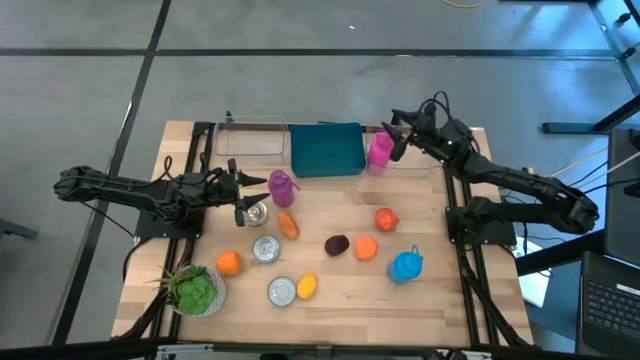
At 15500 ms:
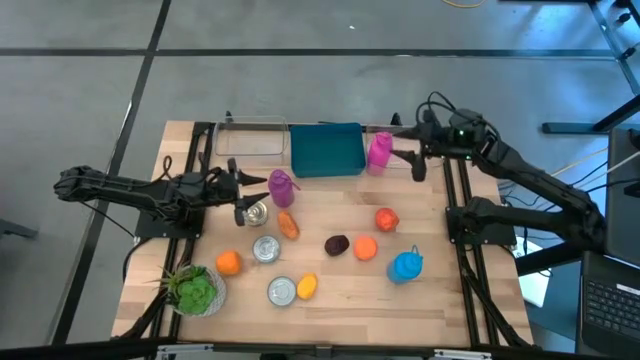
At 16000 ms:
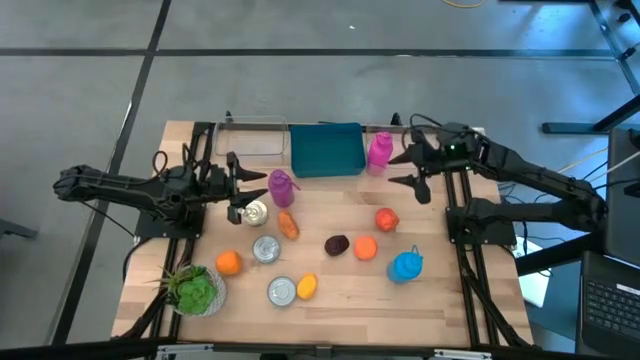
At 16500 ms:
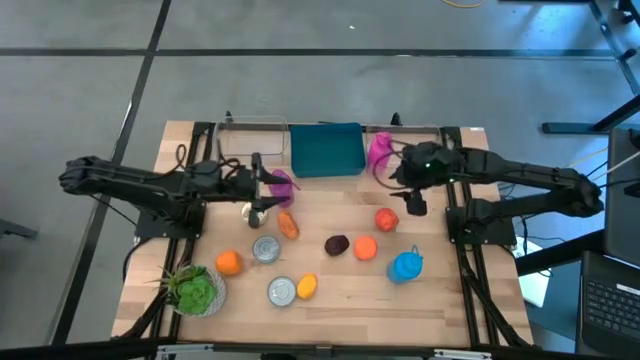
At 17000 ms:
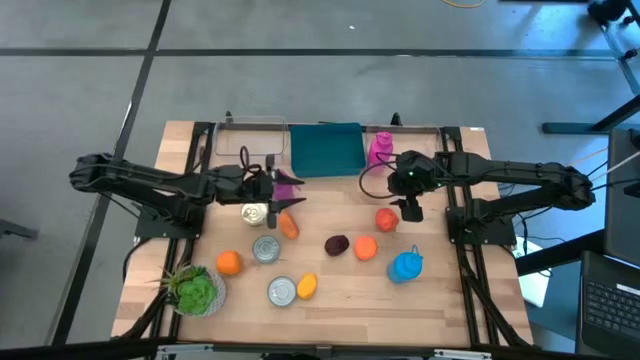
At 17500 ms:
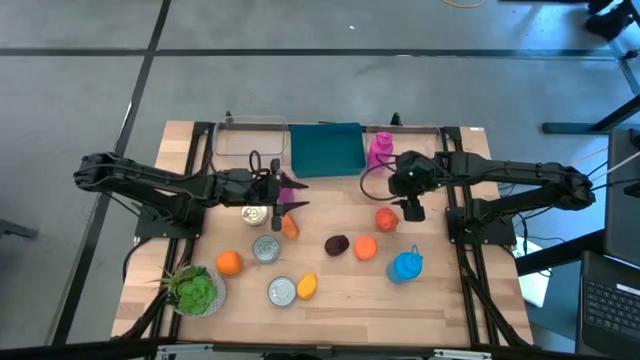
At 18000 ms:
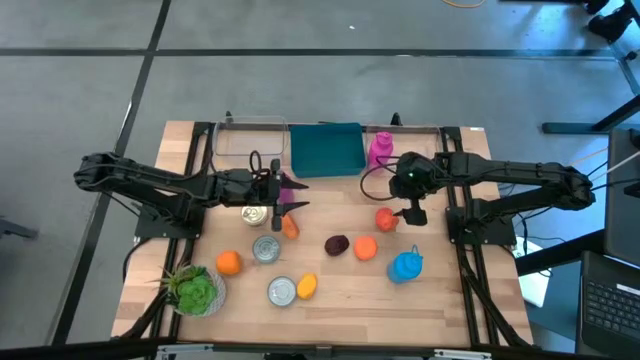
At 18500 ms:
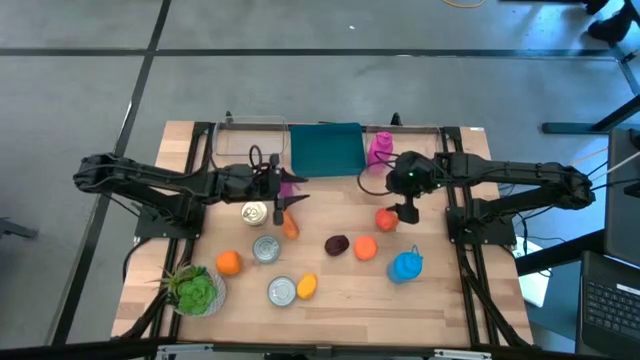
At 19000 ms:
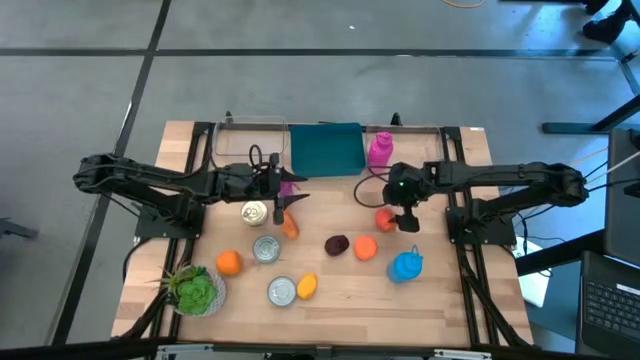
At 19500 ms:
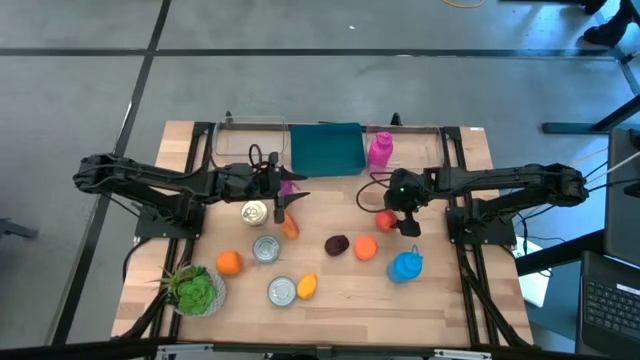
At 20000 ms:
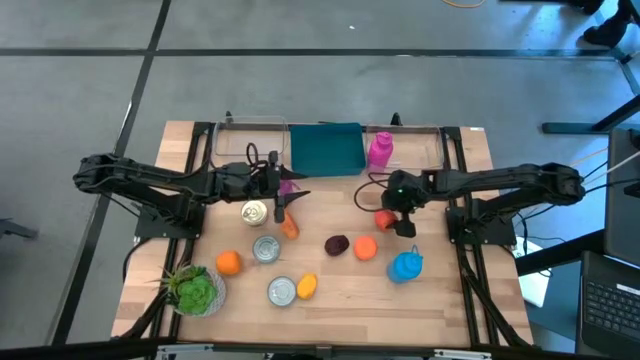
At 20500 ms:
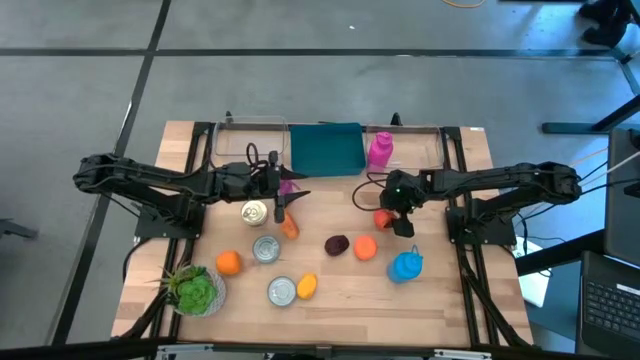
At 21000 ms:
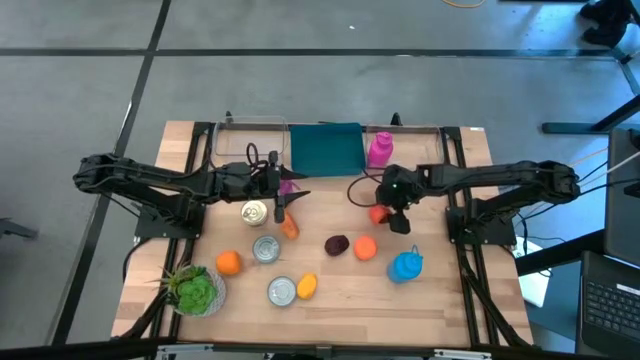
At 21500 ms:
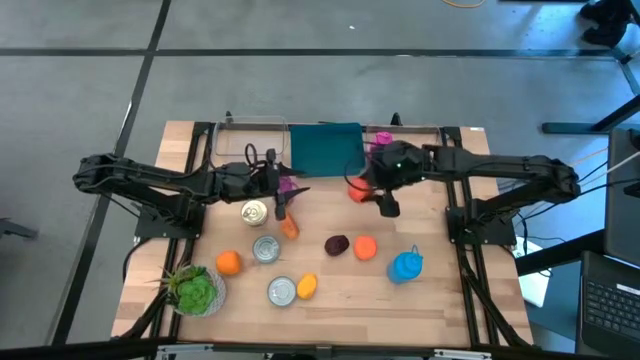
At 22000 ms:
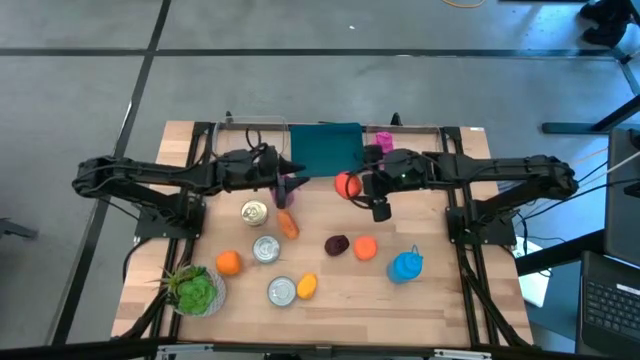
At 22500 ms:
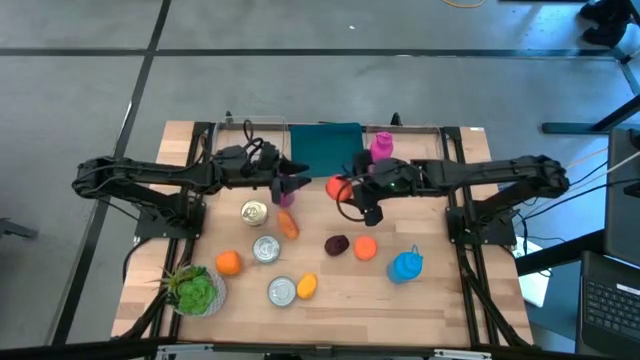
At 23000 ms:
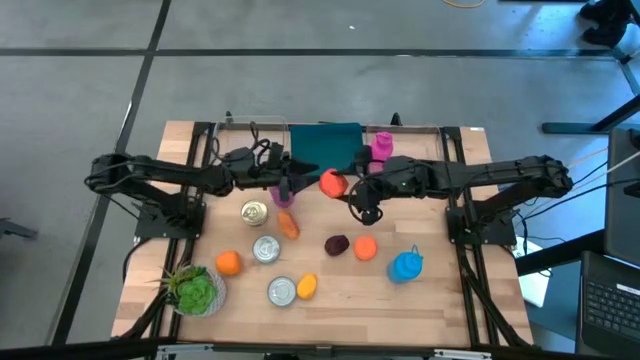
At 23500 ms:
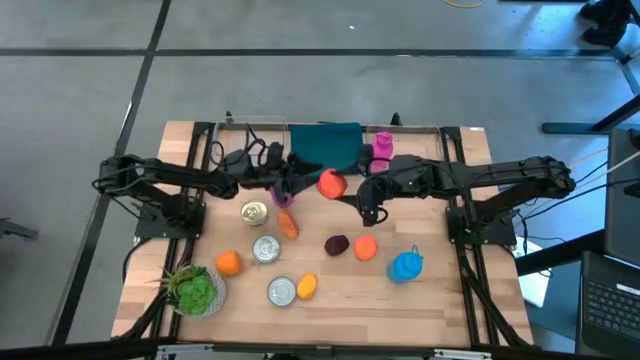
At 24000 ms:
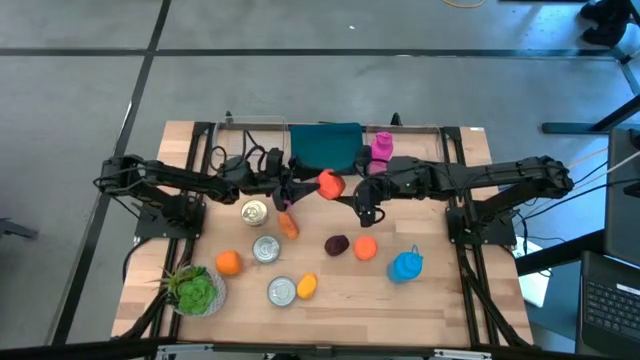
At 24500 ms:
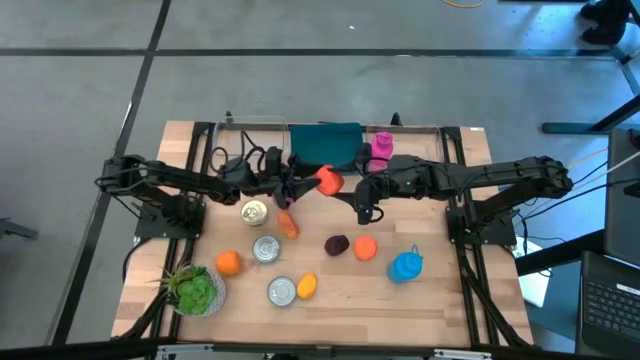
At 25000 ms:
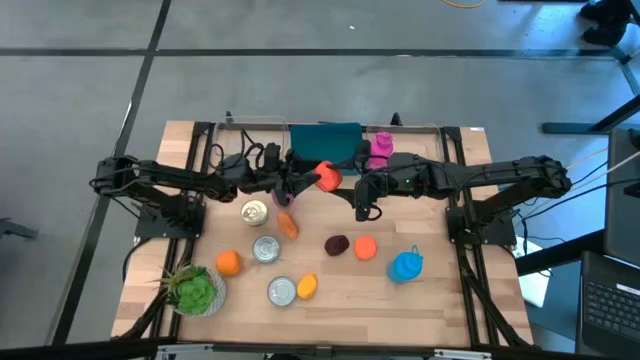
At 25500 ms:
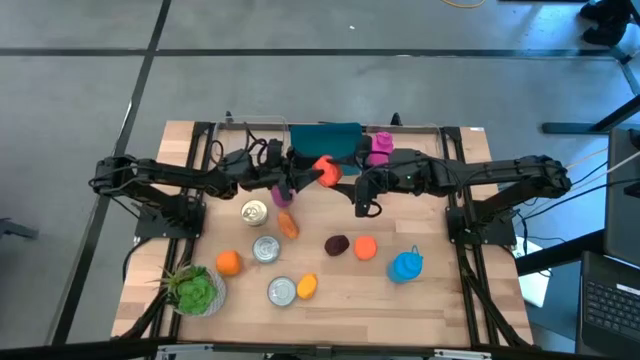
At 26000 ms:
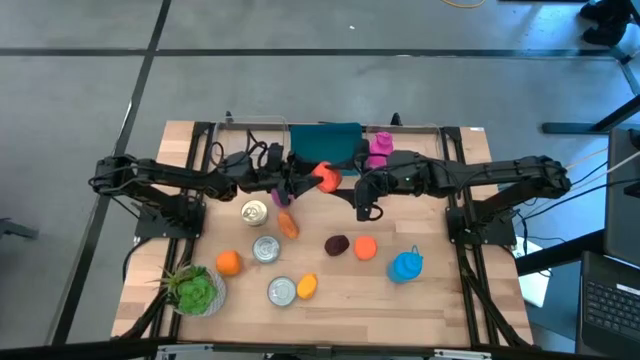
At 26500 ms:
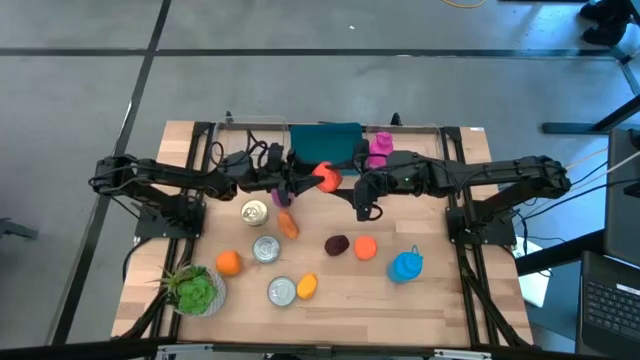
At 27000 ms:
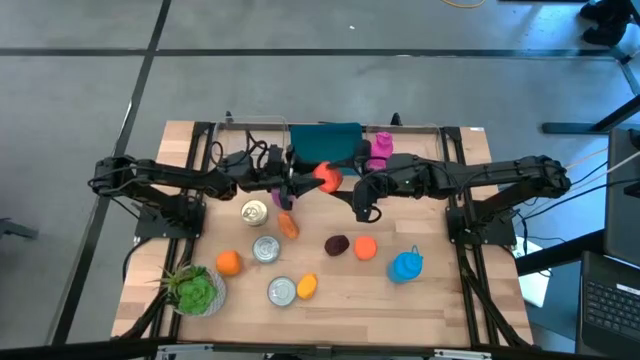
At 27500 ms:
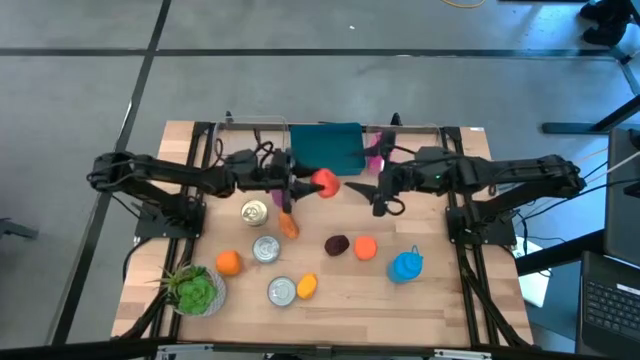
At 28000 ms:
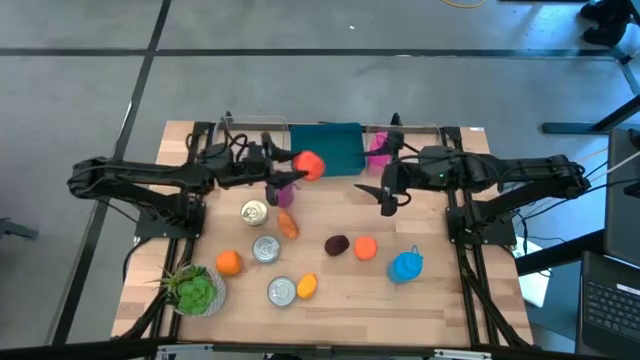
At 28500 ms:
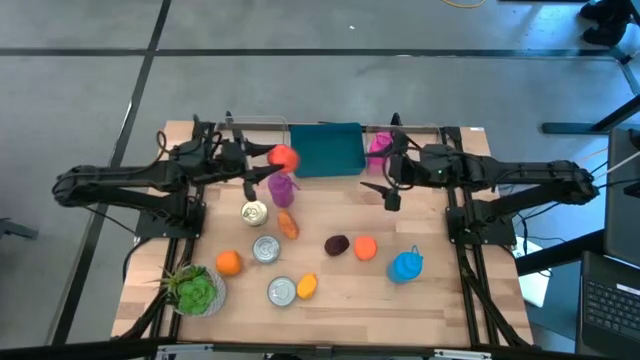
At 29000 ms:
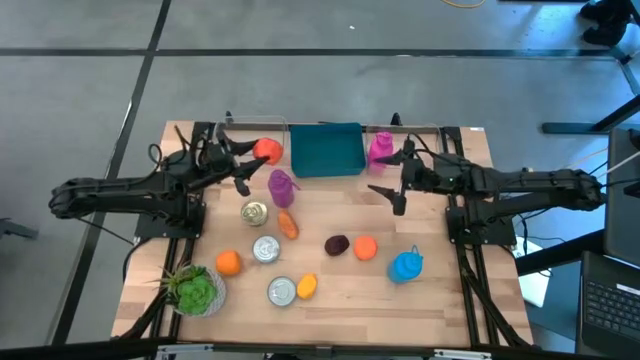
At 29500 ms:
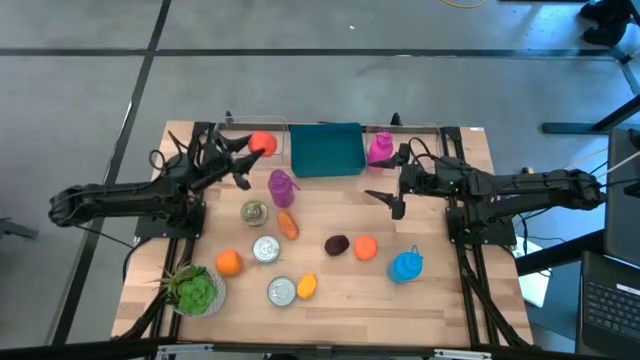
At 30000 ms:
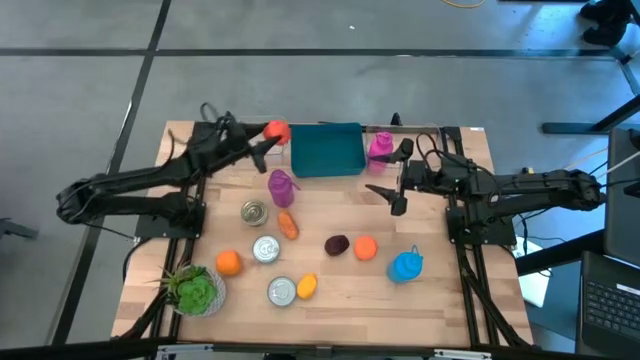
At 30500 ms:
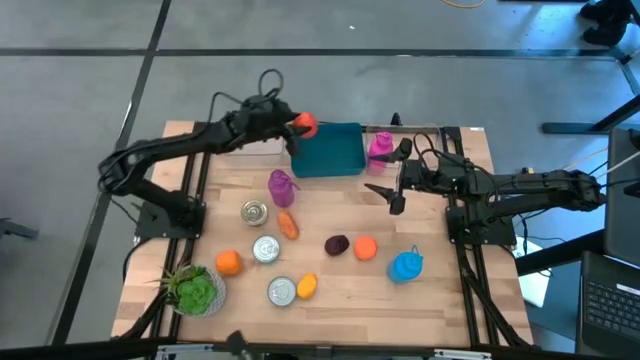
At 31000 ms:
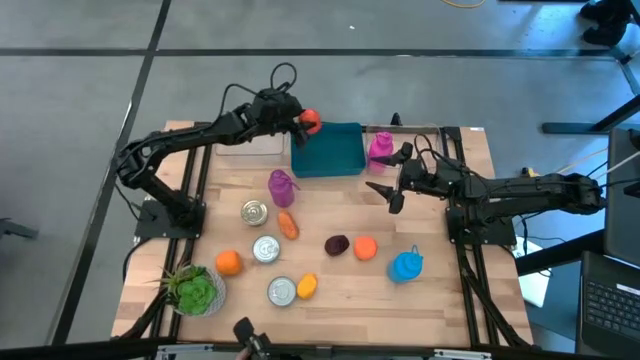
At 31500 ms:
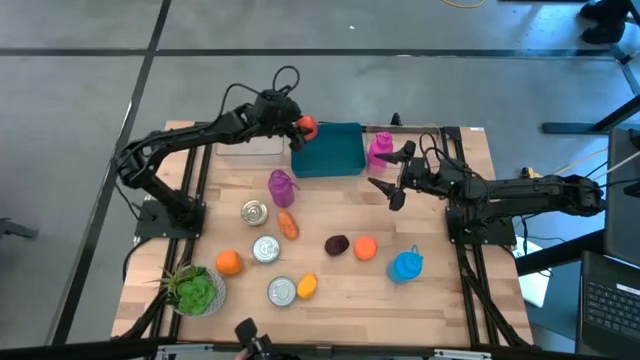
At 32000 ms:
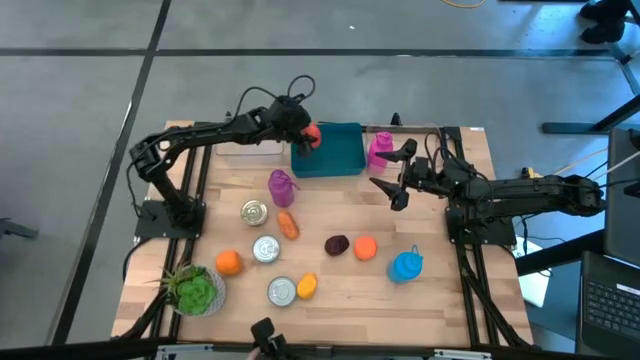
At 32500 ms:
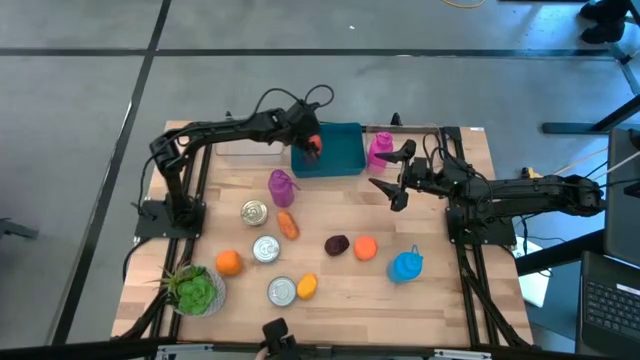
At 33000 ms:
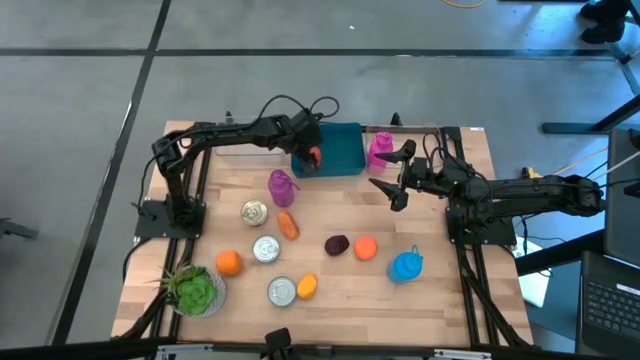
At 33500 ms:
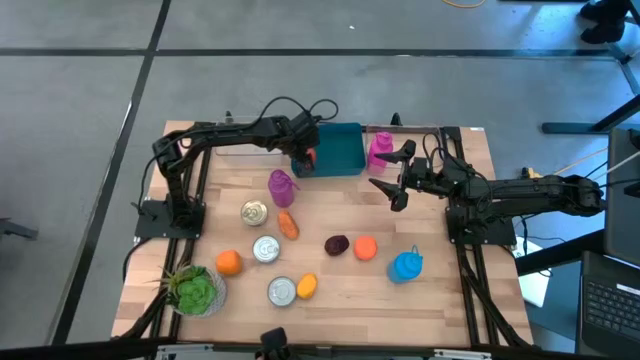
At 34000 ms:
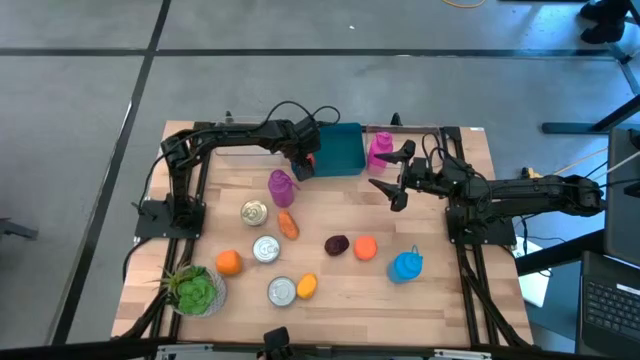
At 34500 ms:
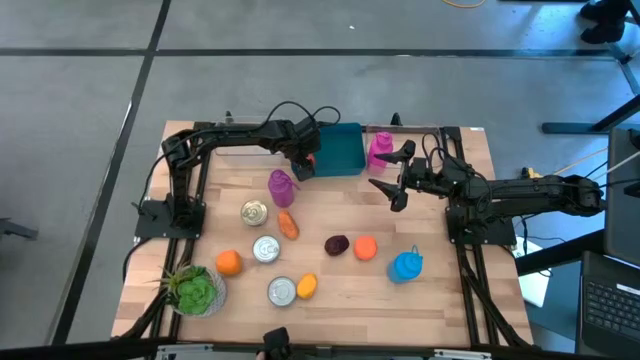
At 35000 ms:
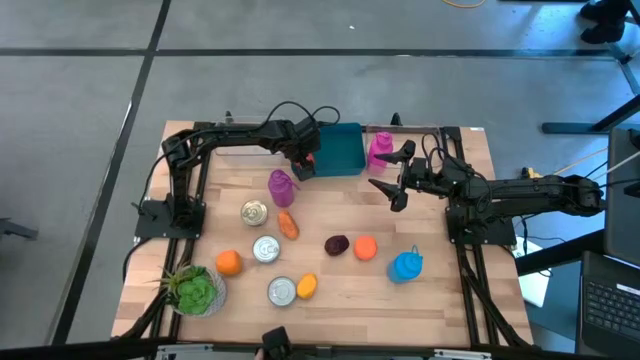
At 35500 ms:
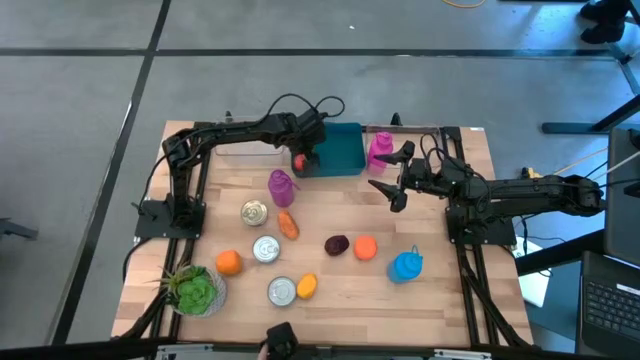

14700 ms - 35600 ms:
Task: Pick & Place Food Item
Put the top right orange into the blue bin
